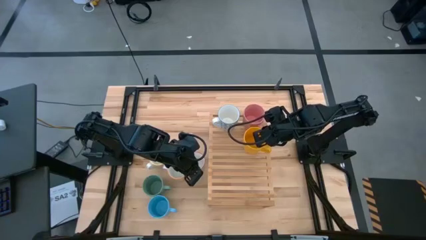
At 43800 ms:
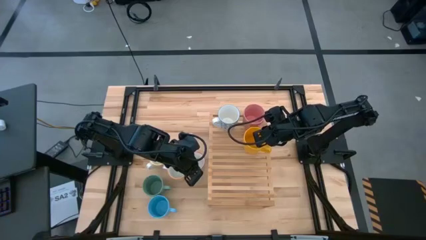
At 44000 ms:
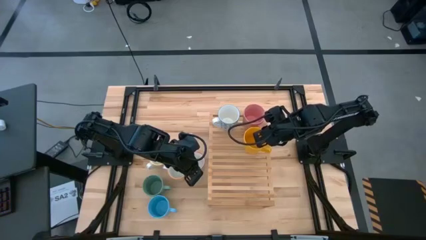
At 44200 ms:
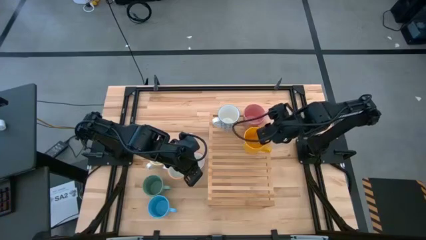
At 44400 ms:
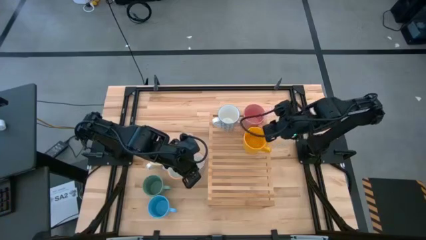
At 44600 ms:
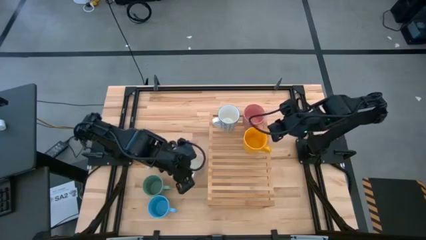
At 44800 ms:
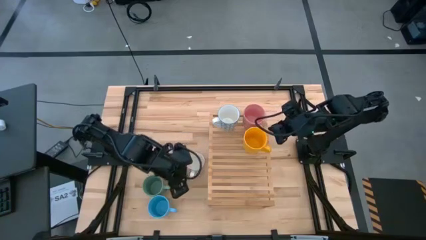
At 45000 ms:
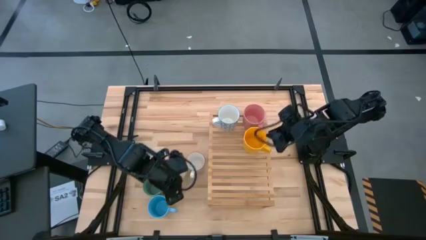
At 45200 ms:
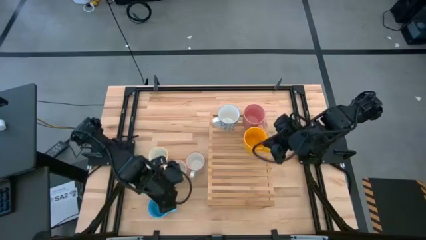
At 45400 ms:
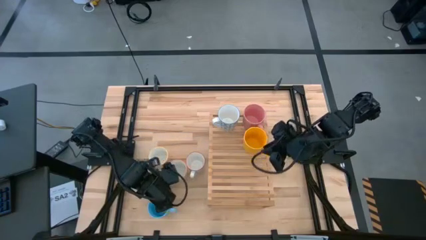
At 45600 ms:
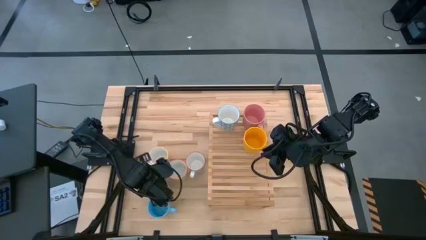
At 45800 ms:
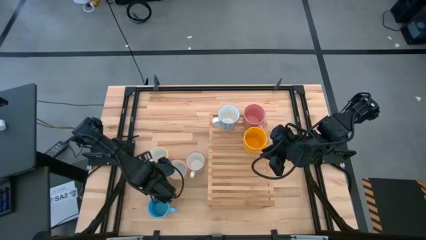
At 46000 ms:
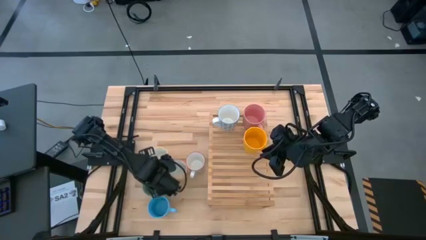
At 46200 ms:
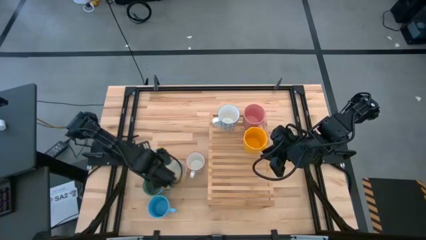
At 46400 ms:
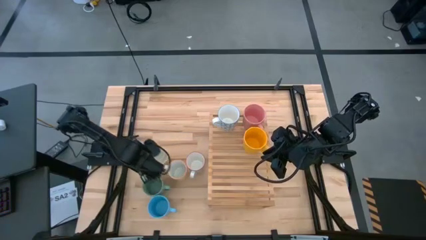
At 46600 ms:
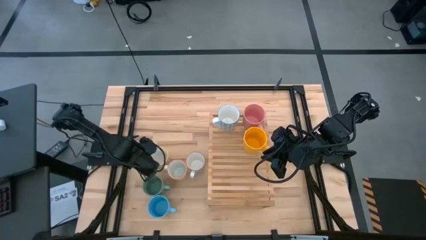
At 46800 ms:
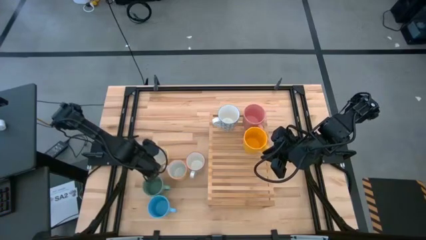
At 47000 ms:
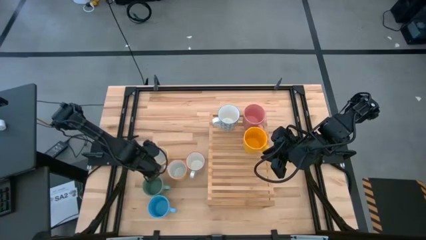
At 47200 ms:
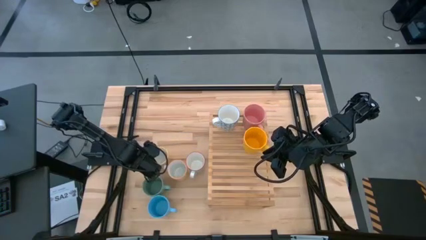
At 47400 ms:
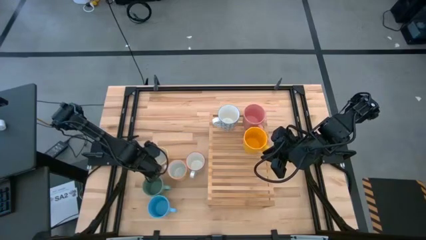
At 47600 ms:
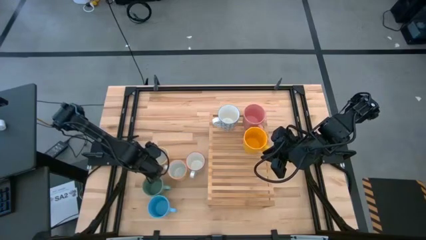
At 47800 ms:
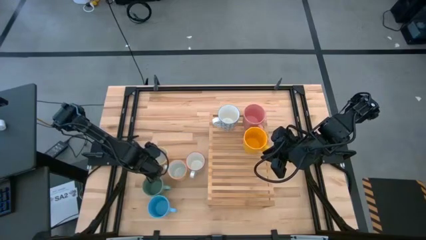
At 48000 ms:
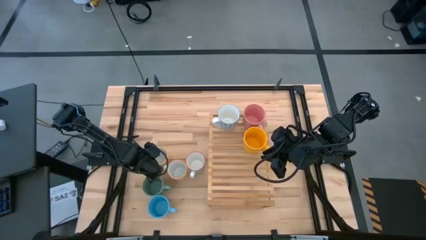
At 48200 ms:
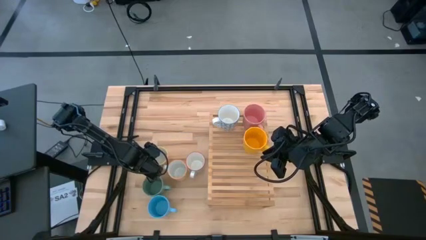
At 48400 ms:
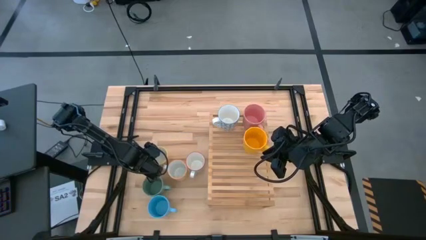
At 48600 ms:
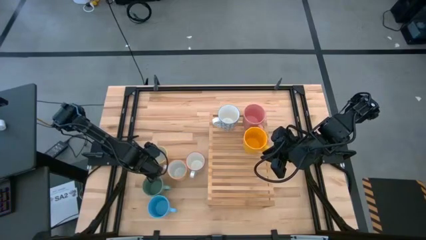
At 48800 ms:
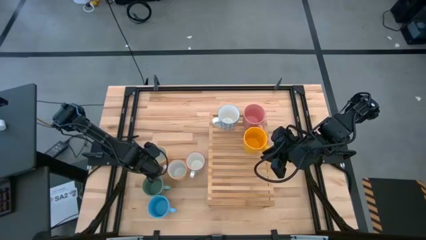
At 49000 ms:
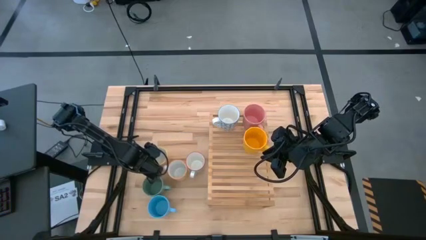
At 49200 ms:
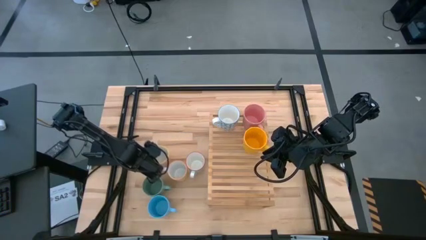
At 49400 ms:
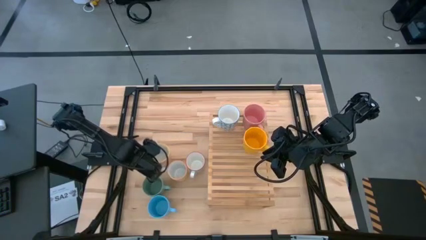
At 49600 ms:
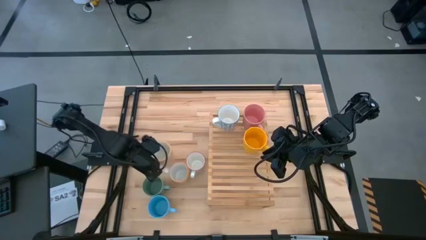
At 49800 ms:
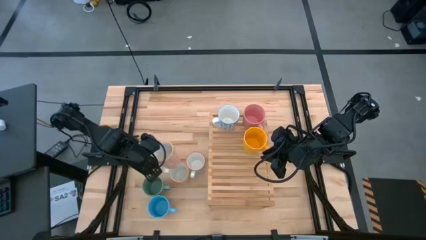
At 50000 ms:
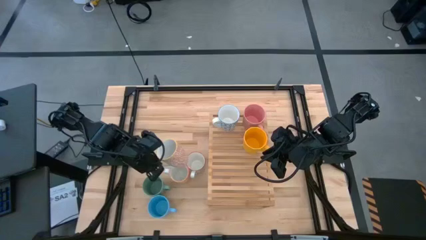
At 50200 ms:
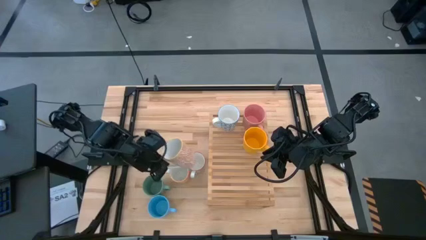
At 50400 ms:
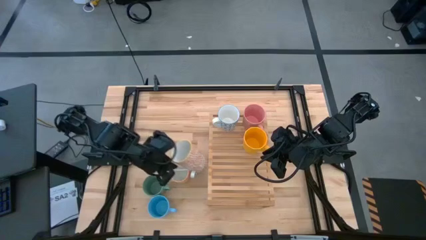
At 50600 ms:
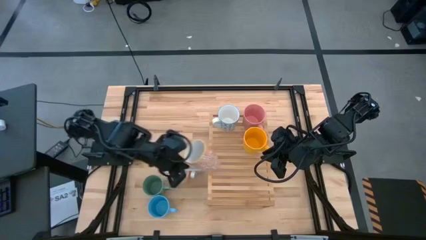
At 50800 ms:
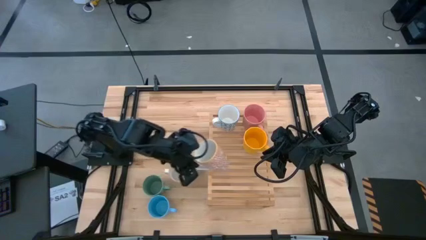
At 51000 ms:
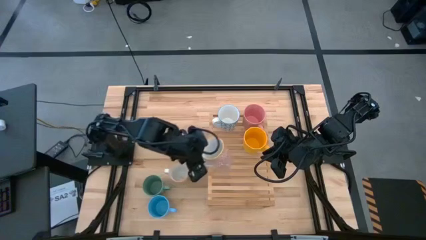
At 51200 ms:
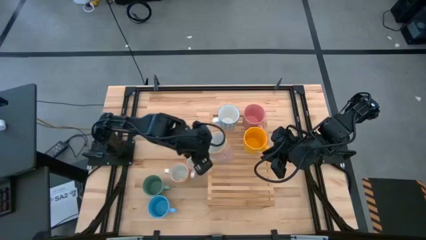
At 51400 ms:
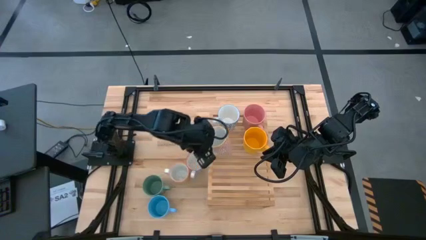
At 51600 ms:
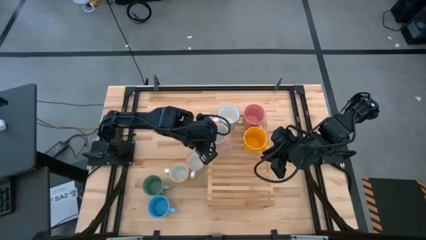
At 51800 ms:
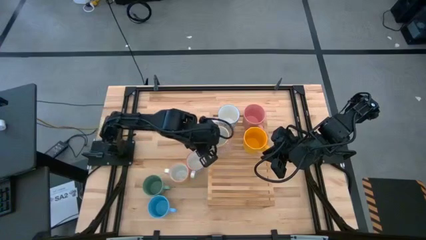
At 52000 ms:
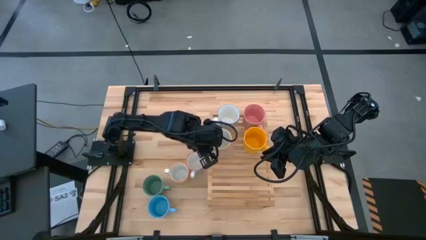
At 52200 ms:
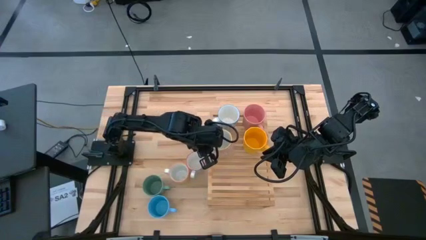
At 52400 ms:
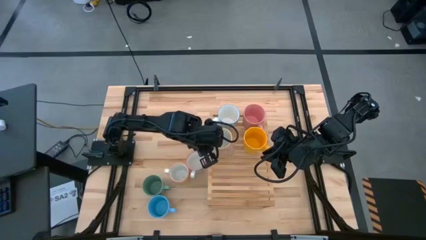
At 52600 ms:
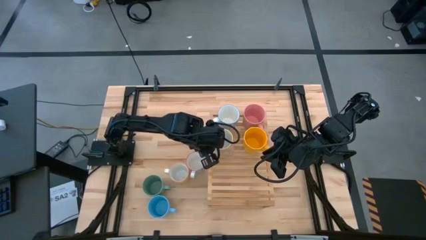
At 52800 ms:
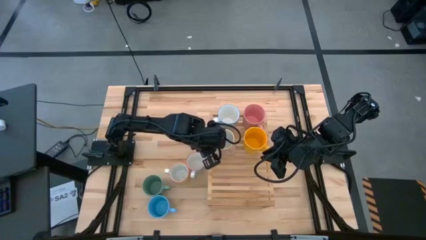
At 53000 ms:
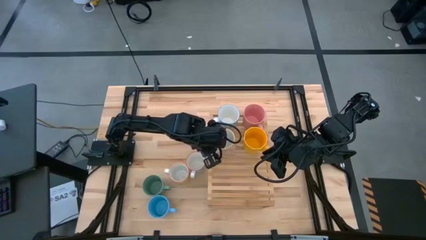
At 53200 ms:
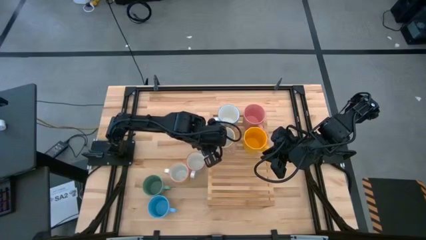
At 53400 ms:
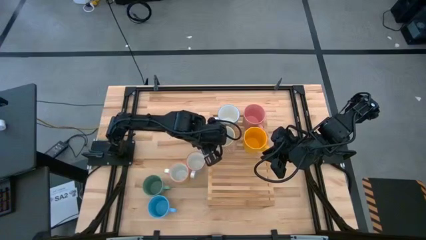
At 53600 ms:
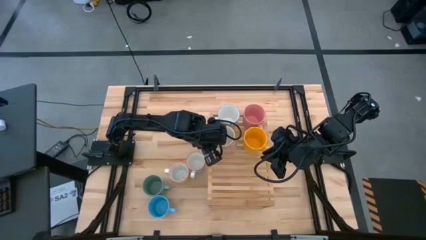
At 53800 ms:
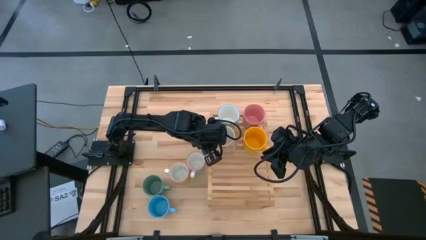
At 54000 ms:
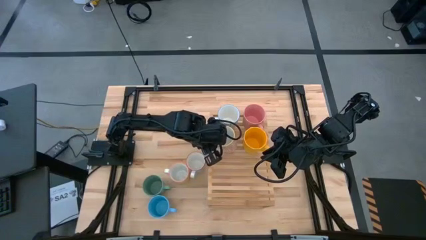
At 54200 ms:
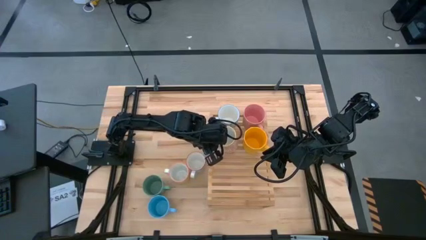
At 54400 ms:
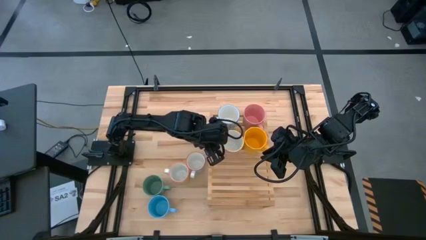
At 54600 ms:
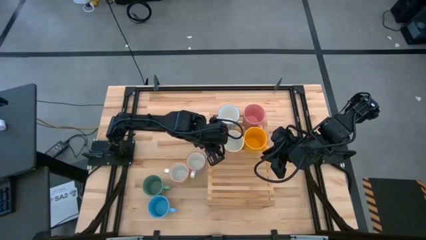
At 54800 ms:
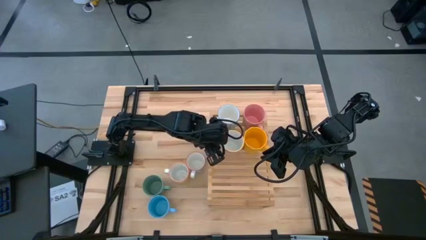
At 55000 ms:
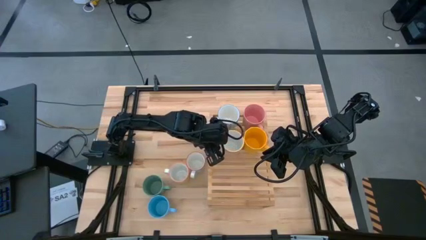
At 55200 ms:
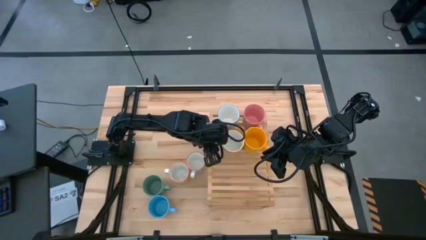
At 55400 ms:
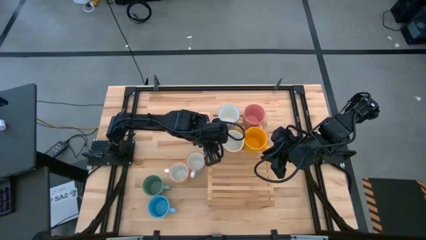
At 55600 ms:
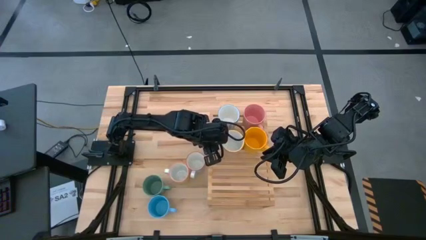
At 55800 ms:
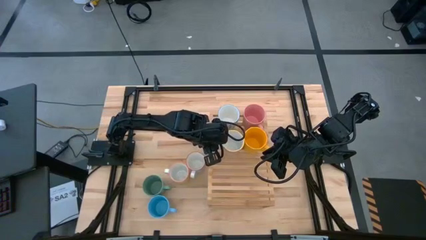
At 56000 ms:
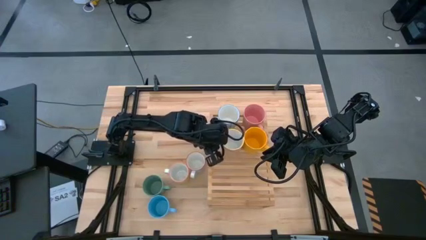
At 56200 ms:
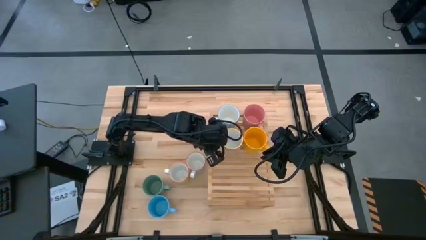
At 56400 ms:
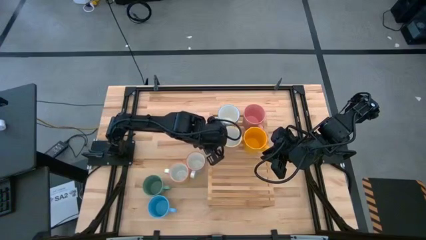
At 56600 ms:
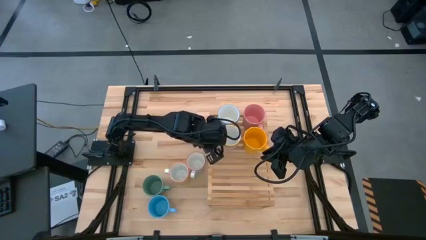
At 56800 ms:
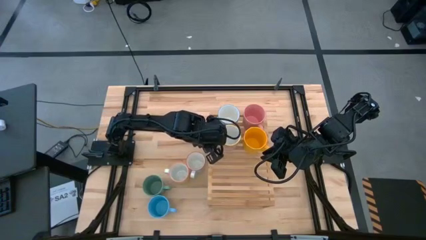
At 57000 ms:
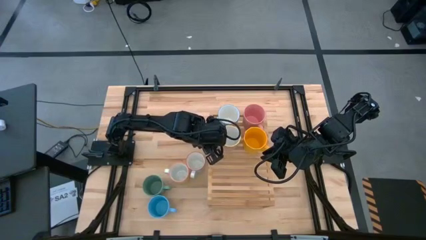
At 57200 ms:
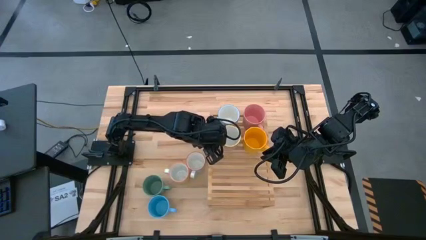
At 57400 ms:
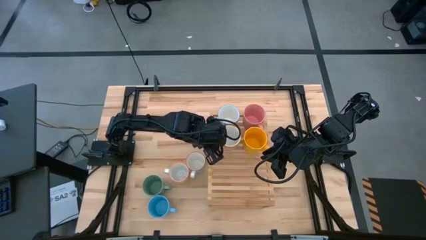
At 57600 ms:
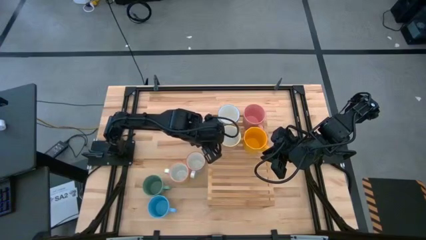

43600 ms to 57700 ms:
Task: Place coffee mugs
Put the orange patterned mug on the shelf
